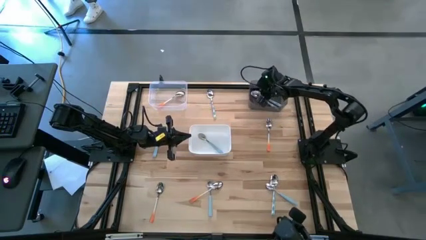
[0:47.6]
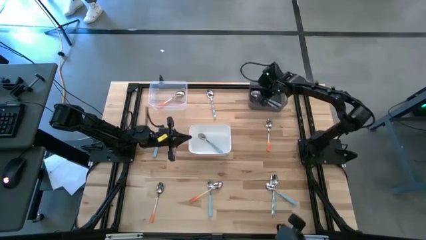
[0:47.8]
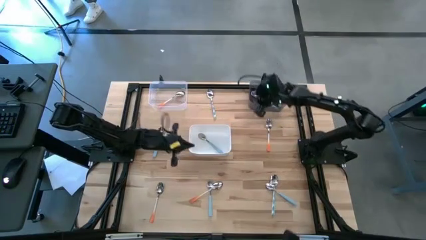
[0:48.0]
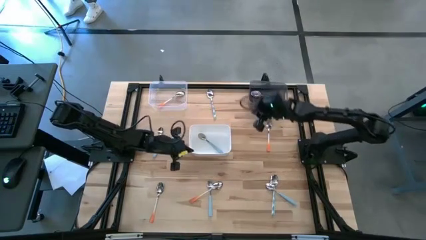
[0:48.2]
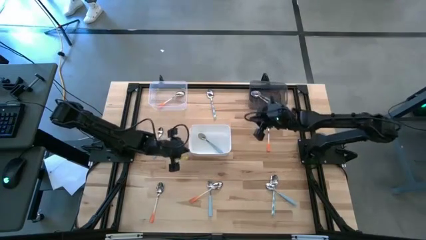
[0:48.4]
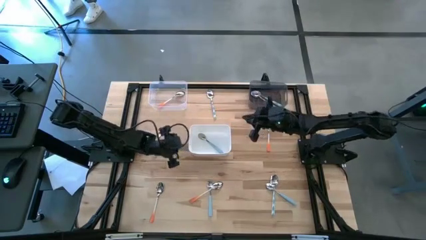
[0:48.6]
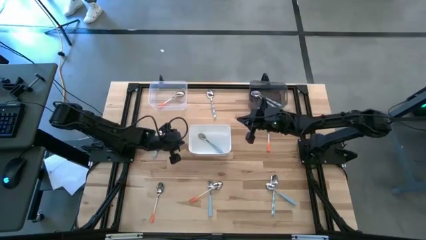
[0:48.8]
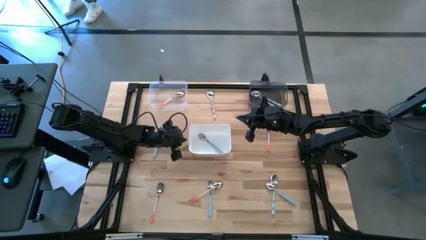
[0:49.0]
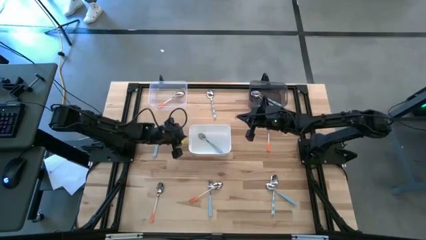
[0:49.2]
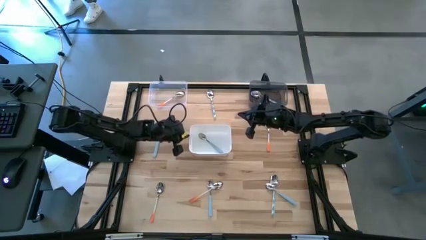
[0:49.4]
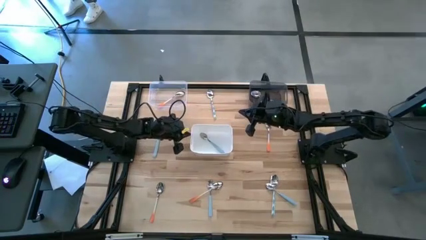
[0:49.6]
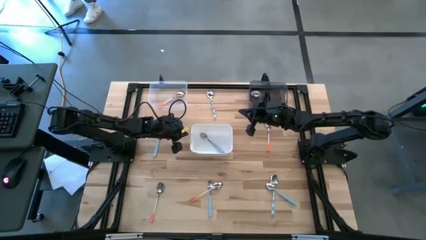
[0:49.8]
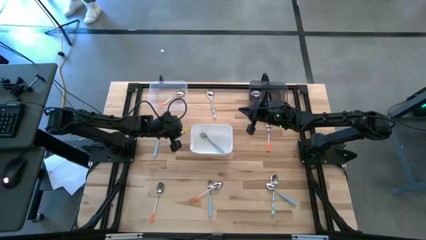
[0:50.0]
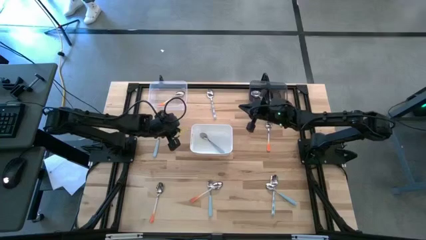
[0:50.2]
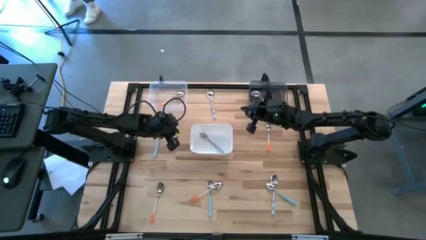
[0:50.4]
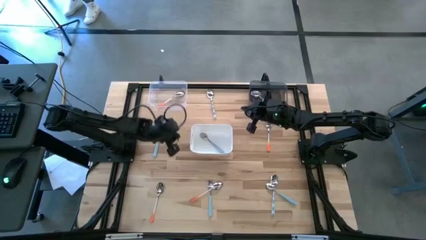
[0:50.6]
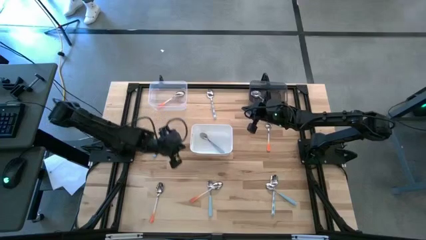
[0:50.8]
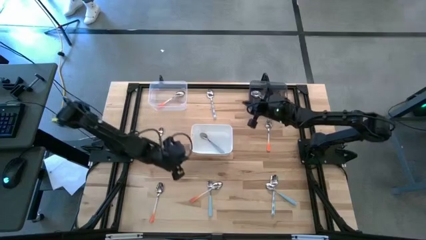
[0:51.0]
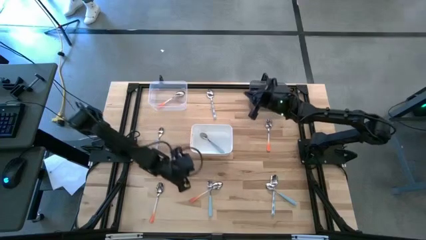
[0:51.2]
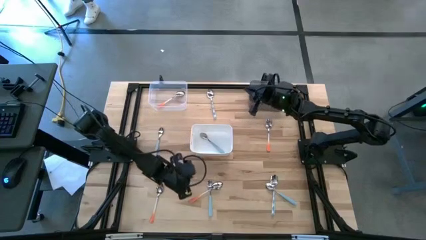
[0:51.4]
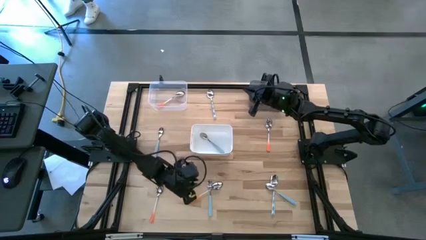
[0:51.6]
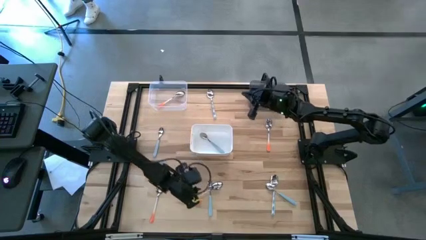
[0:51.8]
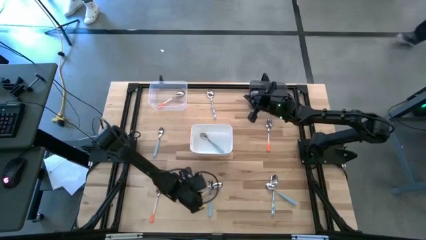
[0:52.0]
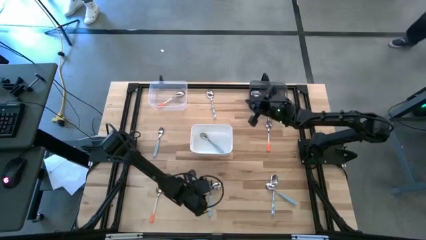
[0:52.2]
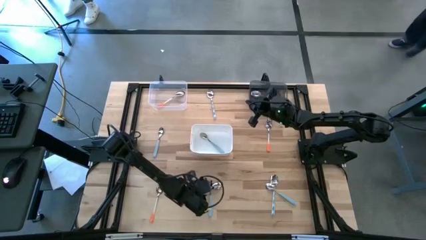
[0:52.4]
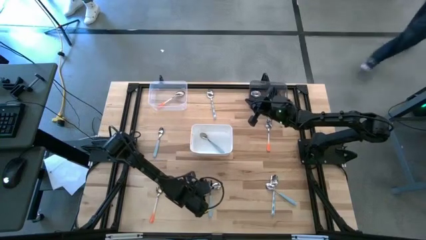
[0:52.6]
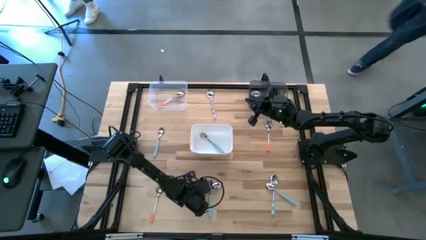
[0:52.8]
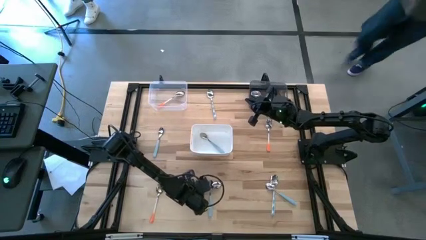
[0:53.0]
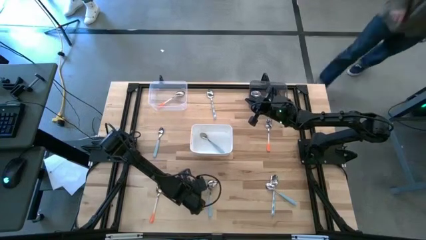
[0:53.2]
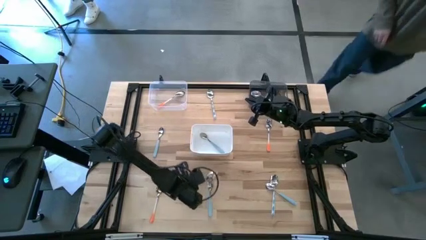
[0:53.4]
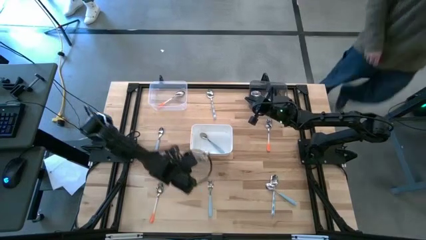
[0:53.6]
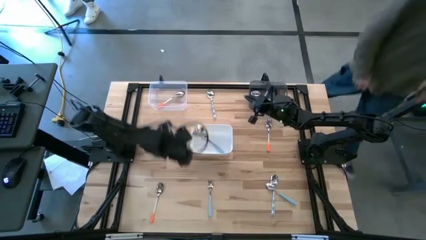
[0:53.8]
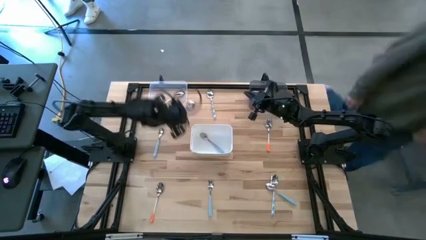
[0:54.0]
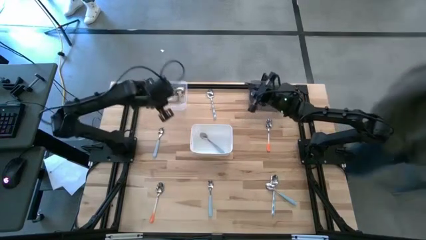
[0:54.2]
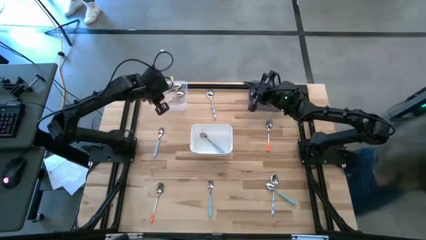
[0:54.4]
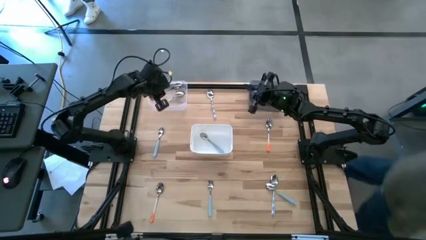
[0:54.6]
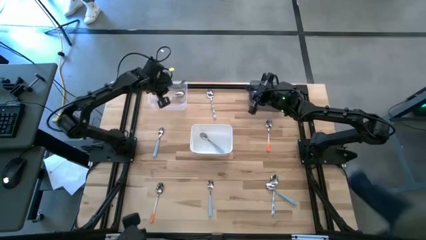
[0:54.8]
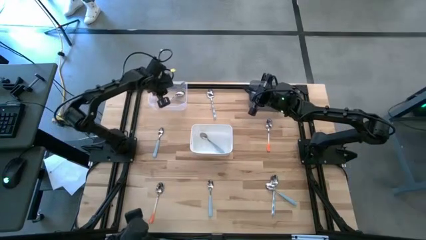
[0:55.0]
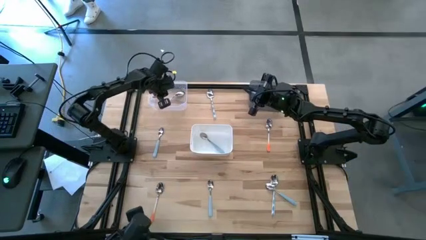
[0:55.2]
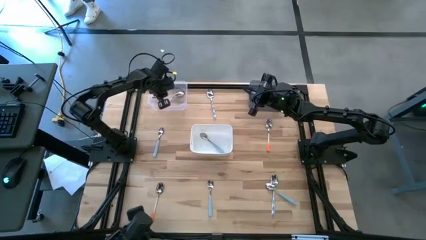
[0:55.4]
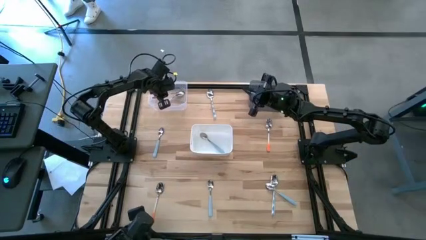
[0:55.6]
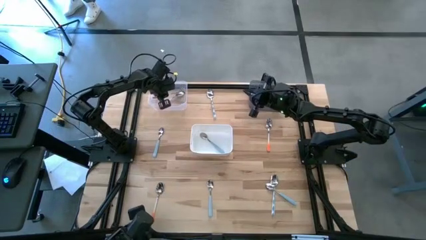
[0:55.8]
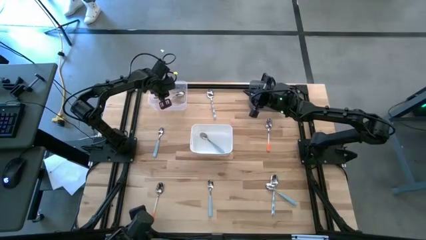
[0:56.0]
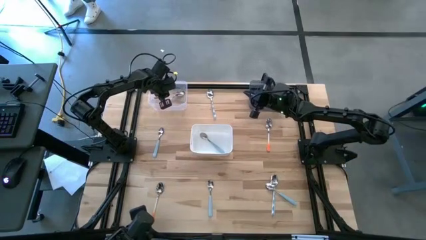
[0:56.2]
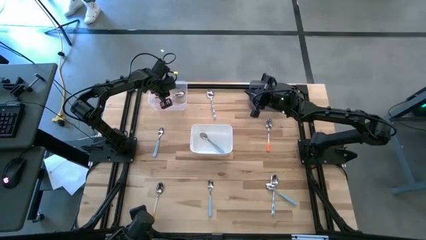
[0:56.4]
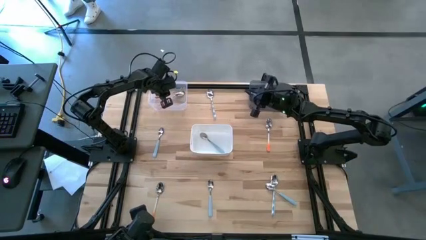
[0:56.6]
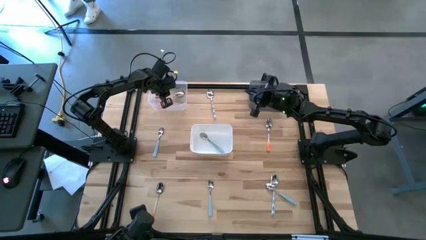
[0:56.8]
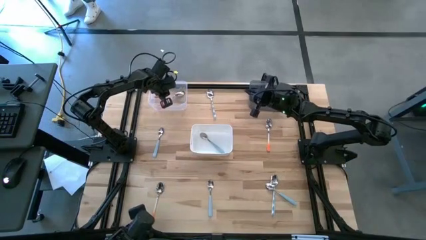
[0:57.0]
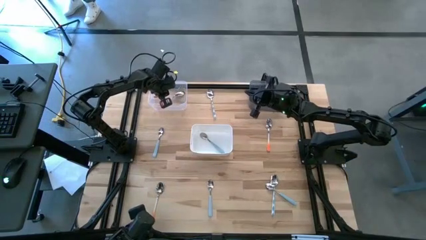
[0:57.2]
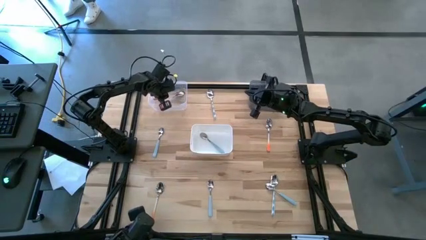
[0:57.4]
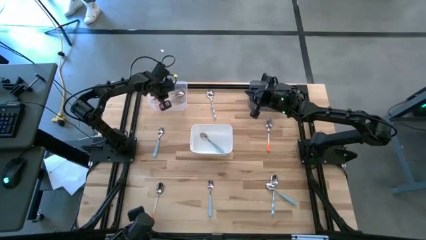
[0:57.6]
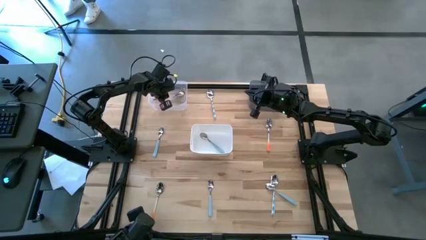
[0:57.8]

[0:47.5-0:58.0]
Task: Sort silverware by color (type)
Put the orange spoon into the transparent bin

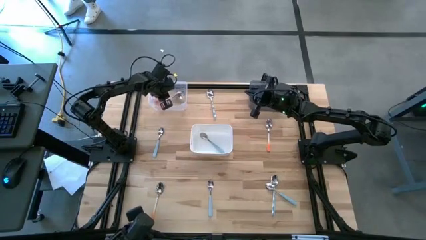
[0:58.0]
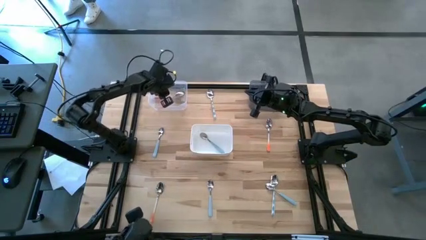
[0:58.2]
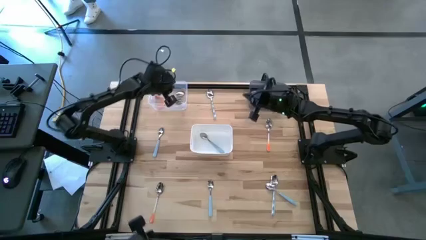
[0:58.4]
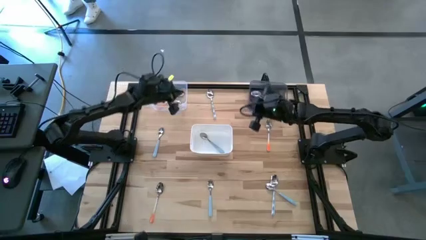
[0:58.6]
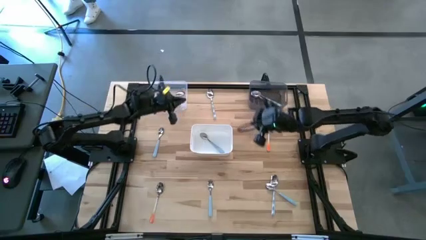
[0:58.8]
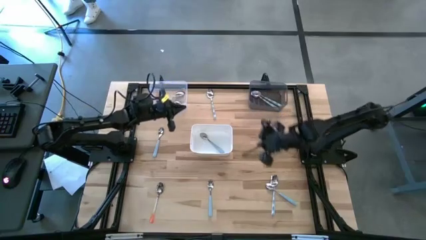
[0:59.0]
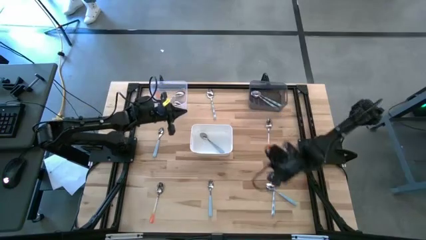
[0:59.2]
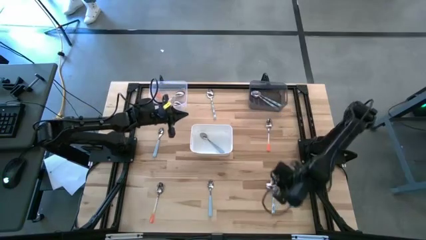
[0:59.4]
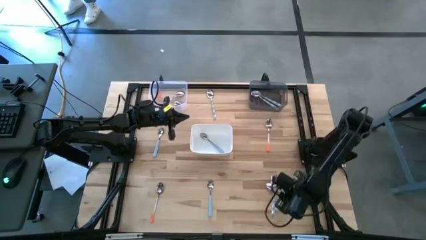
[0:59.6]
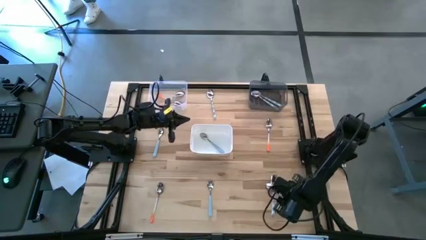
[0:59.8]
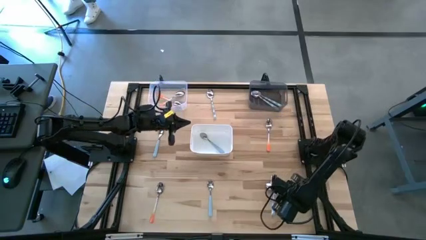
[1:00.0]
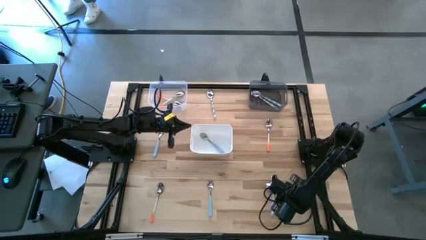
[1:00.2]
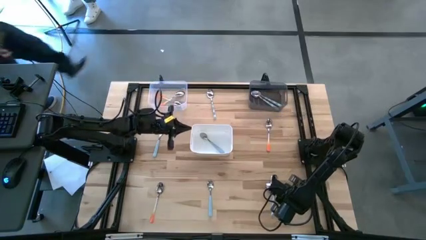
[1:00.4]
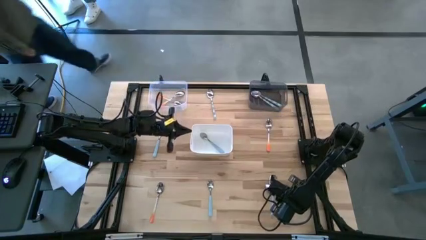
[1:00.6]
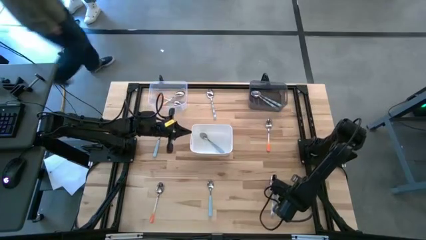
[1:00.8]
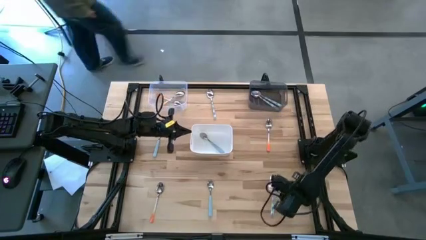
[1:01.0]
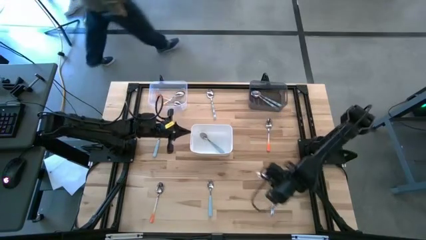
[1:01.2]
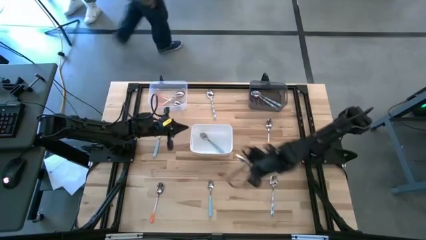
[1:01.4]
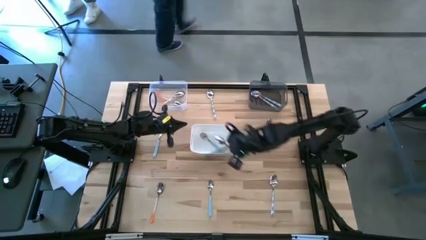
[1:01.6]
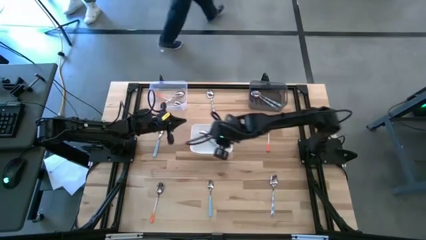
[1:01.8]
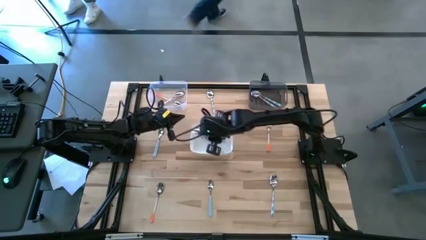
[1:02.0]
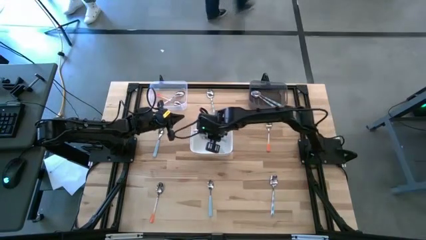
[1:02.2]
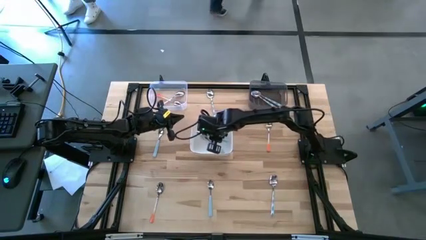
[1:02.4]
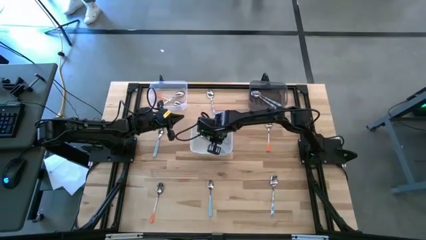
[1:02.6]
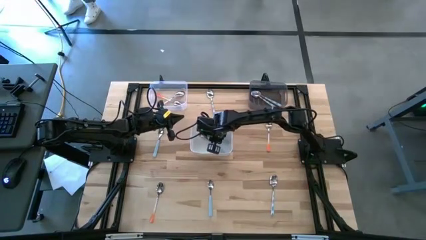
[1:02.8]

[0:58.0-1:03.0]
Put the blue spoon into the white bin

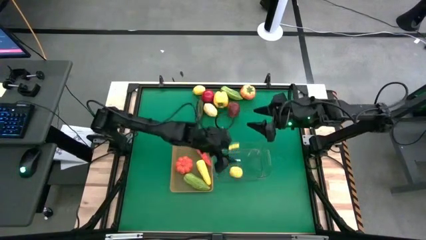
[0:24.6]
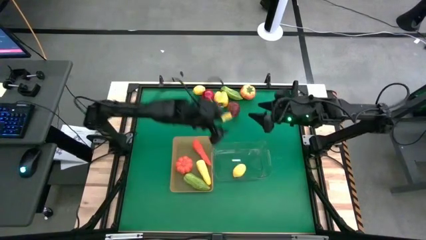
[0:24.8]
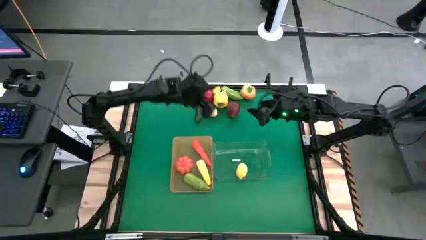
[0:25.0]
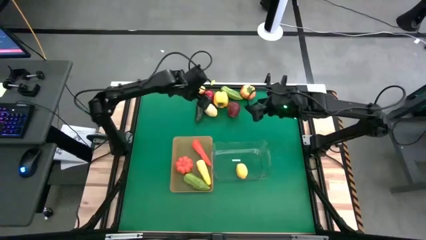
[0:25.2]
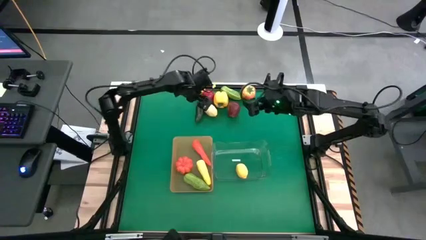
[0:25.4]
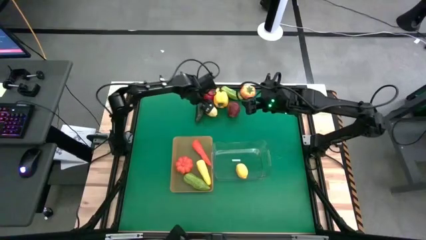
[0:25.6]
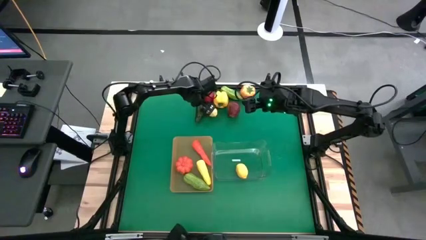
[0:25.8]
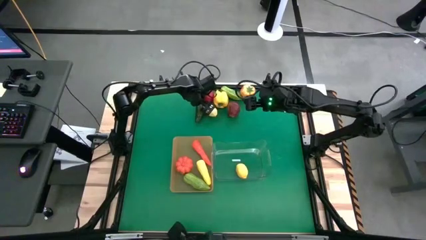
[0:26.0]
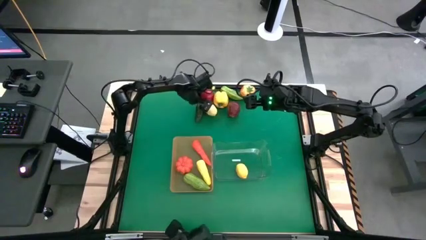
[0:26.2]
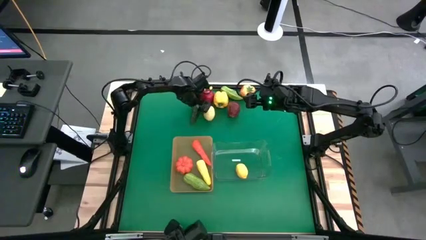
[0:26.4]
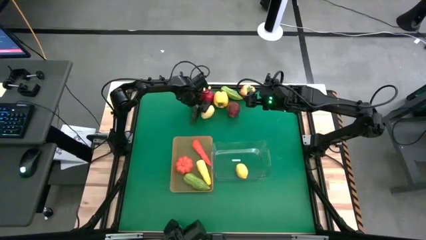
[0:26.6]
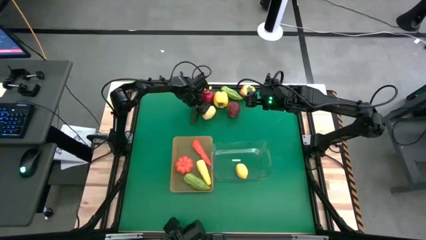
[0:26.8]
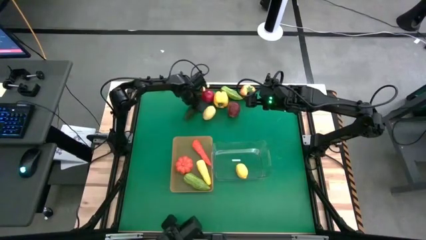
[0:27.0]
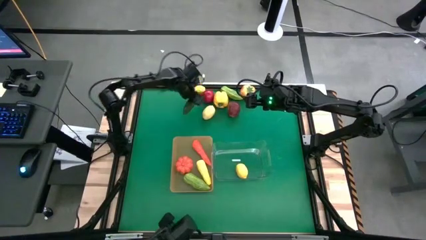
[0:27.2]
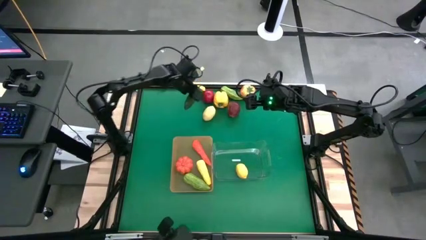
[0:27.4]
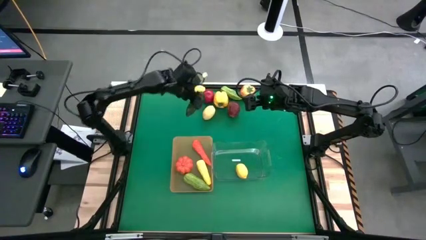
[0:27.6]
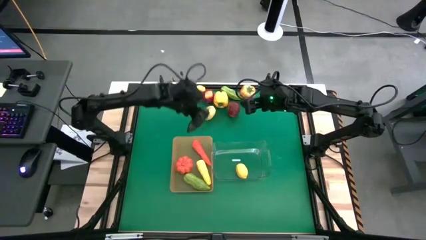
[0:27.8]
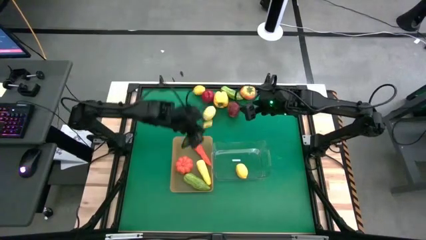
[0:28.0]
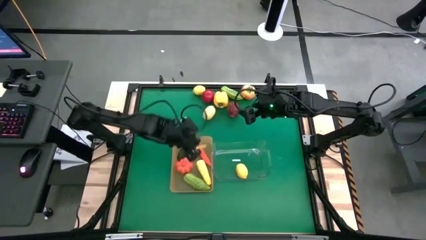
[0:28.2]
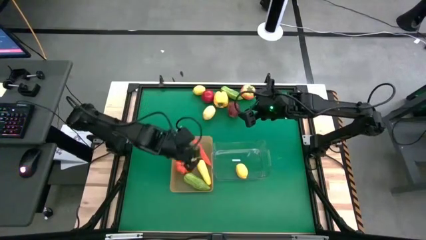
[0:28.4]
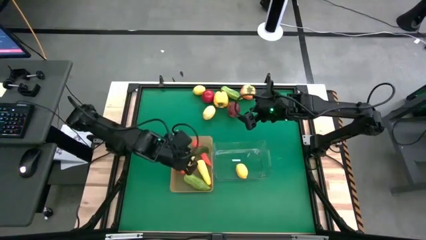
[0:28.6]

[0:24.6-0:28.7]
Task: Sort produce into baskets
Put the green chili pepper into the orange bin
